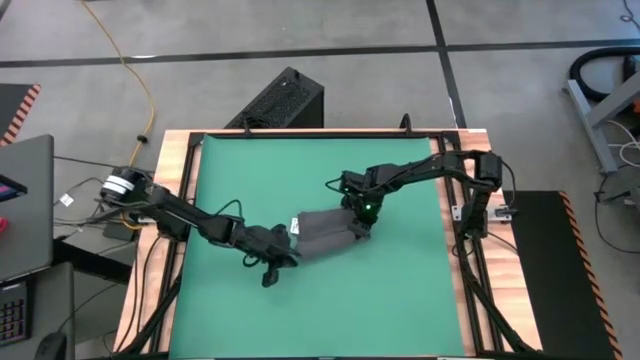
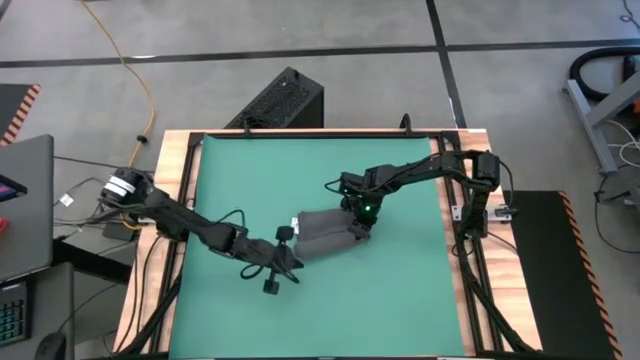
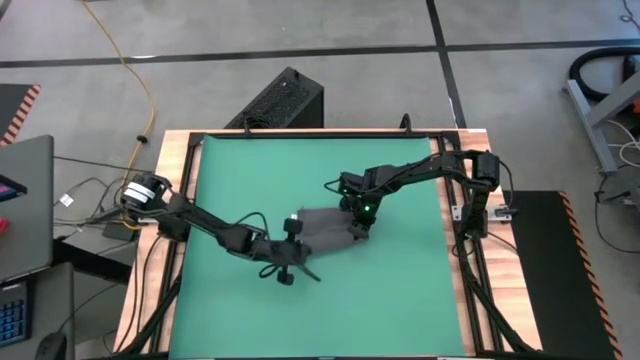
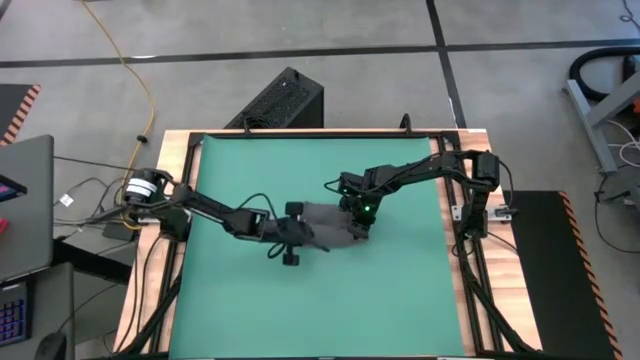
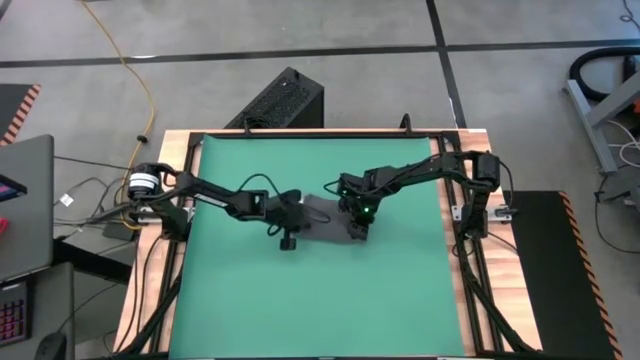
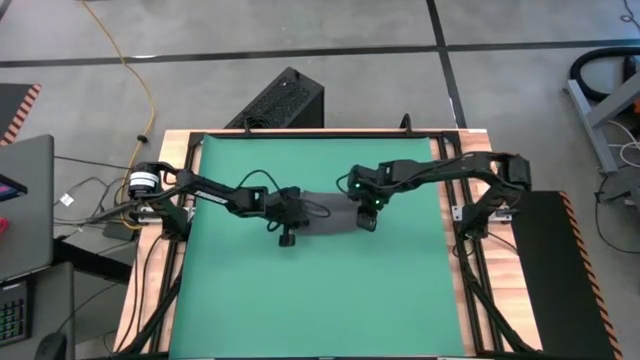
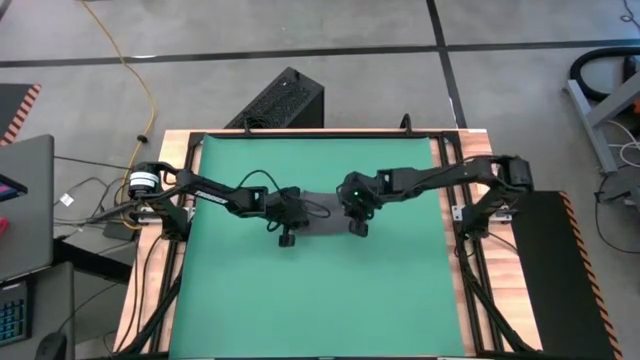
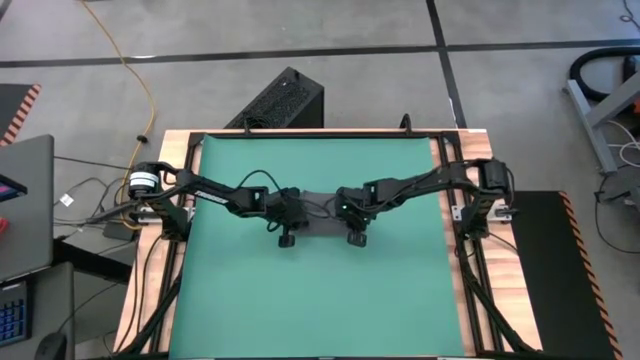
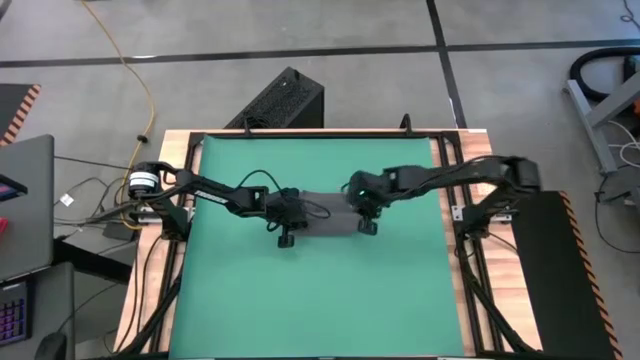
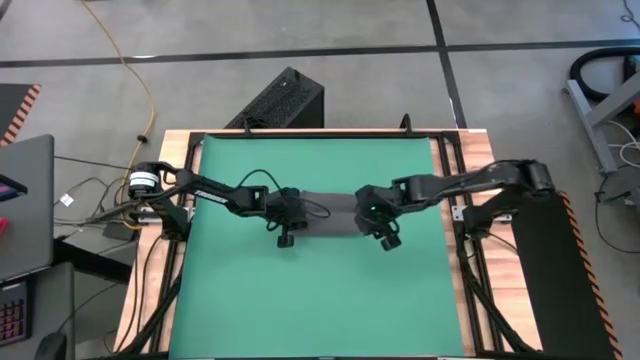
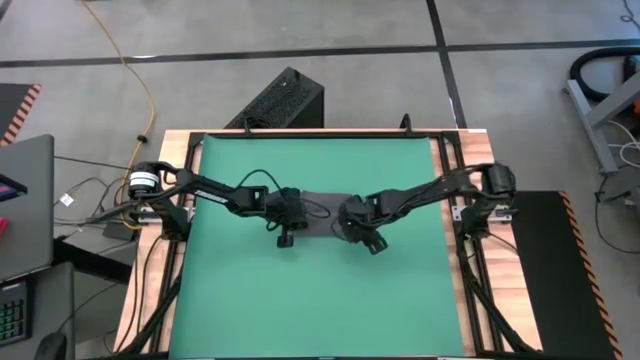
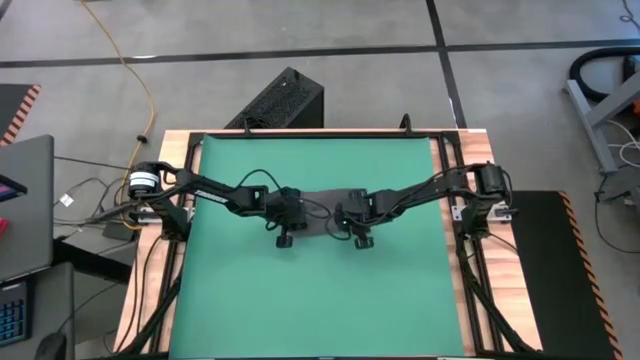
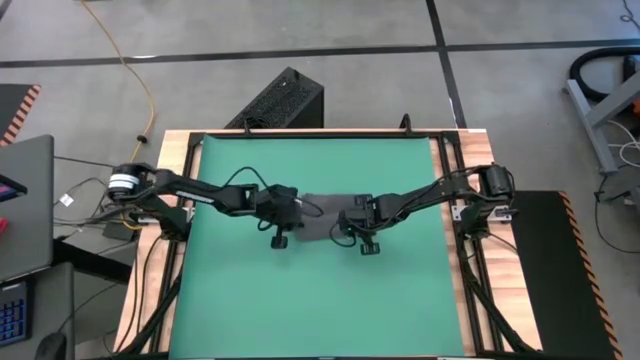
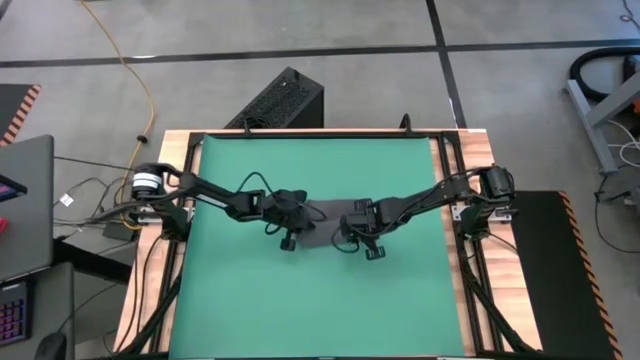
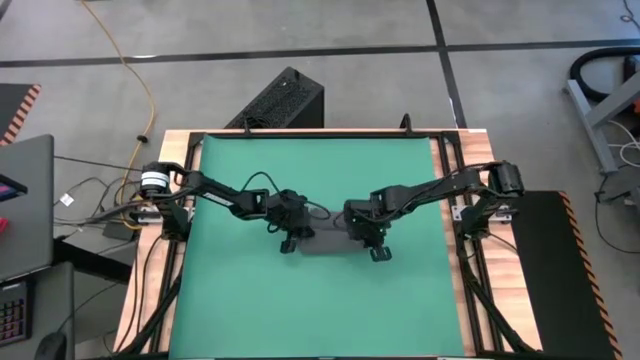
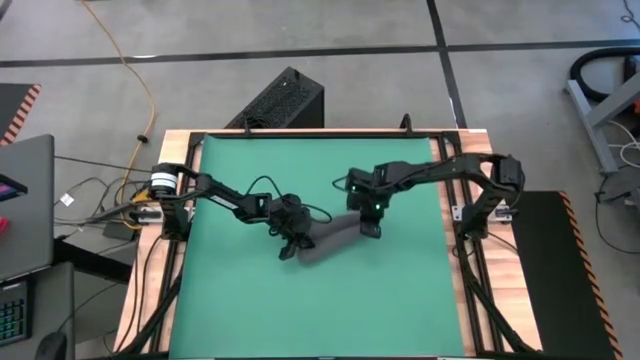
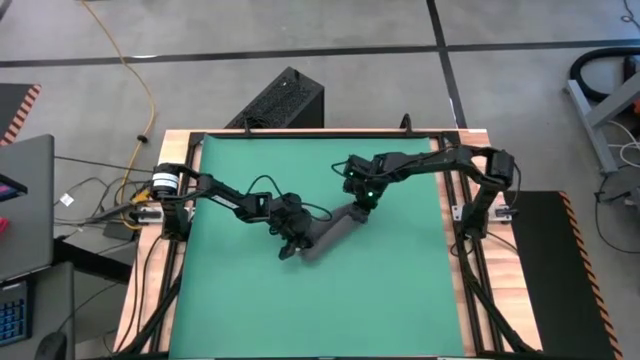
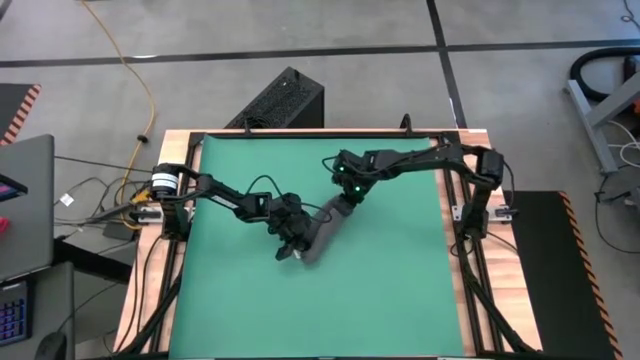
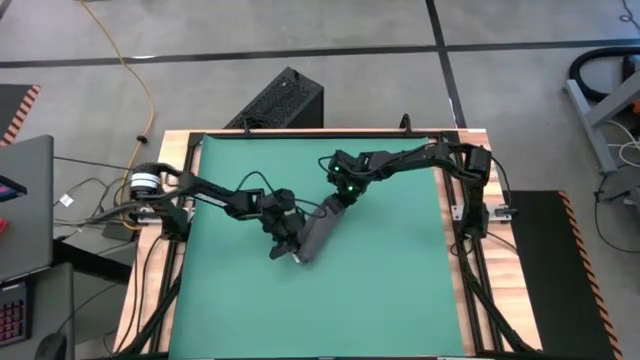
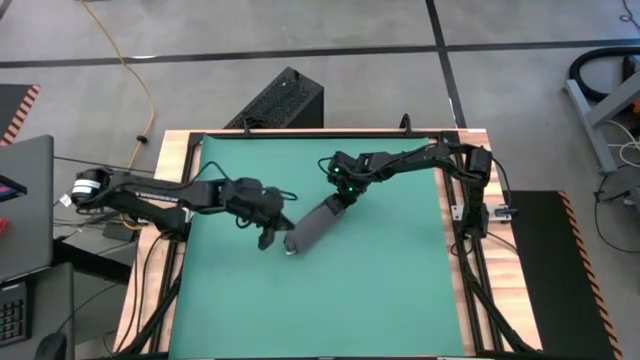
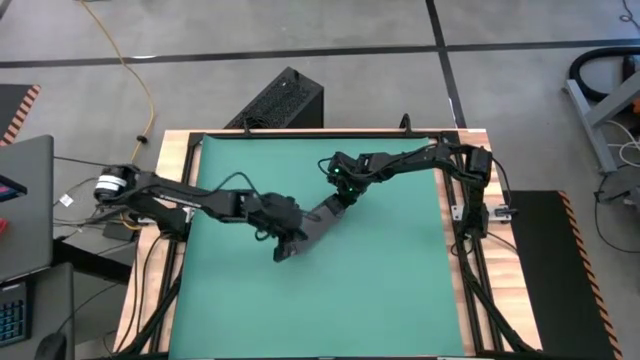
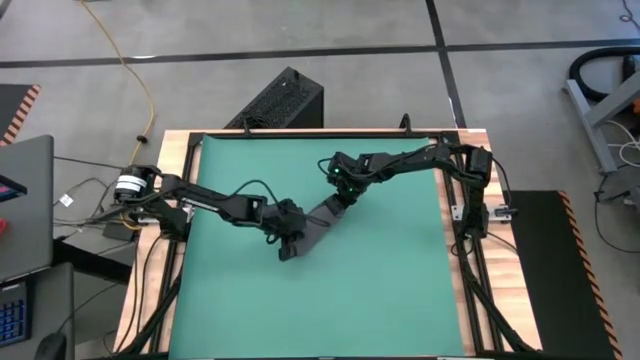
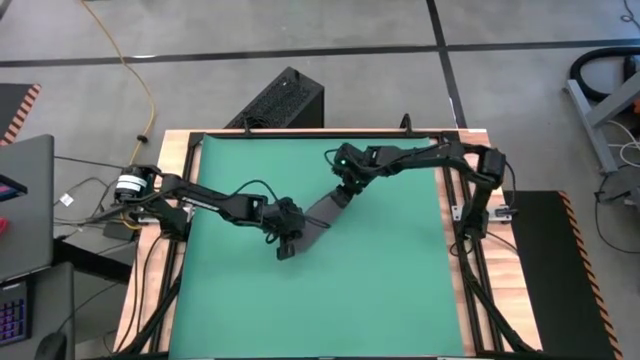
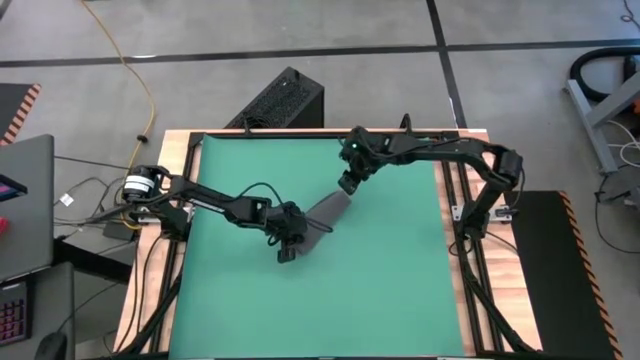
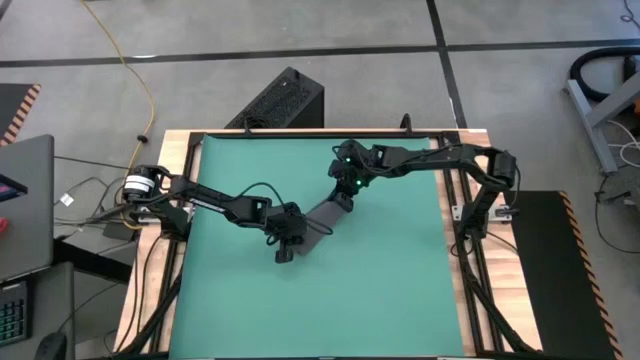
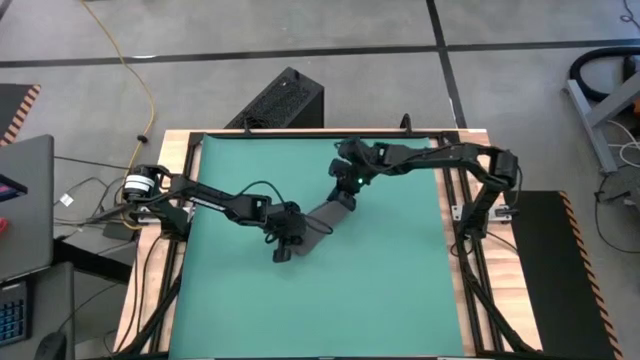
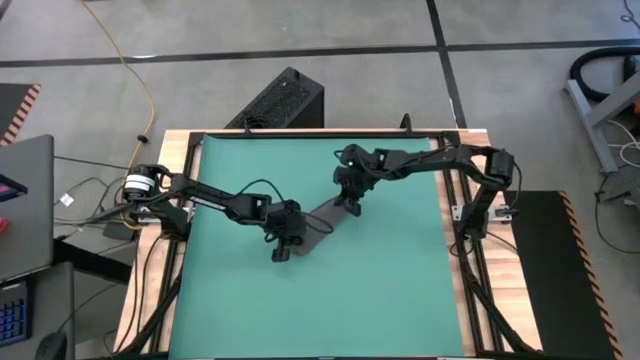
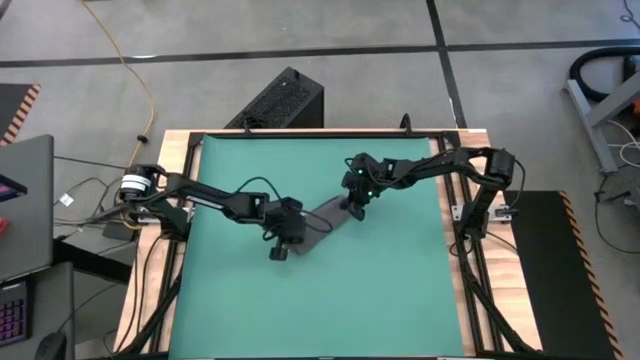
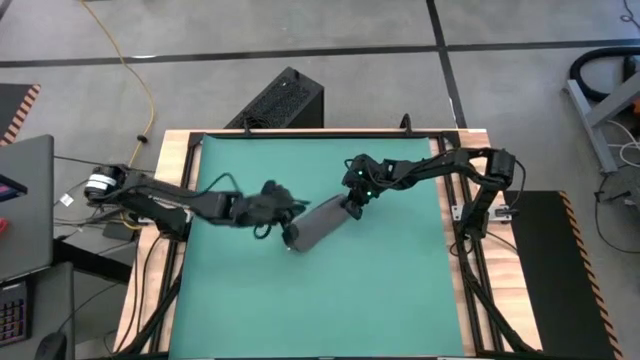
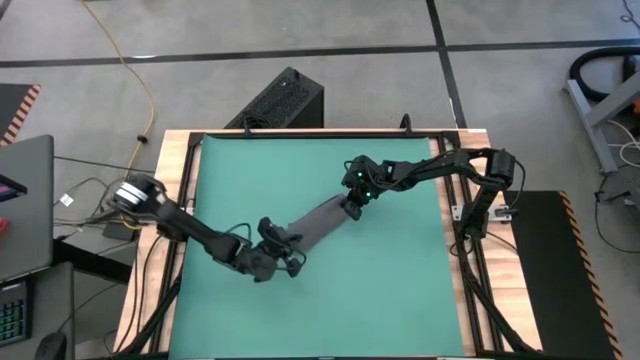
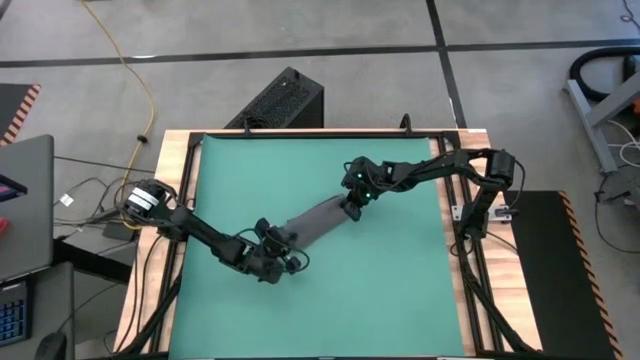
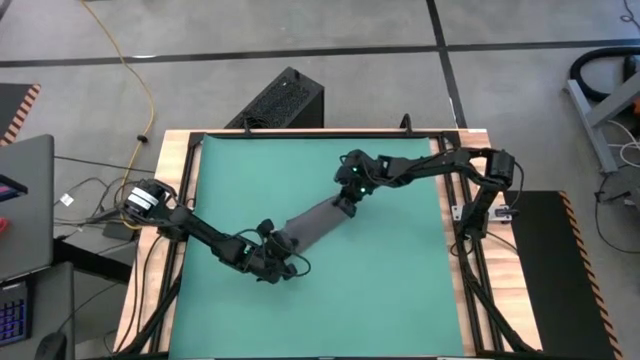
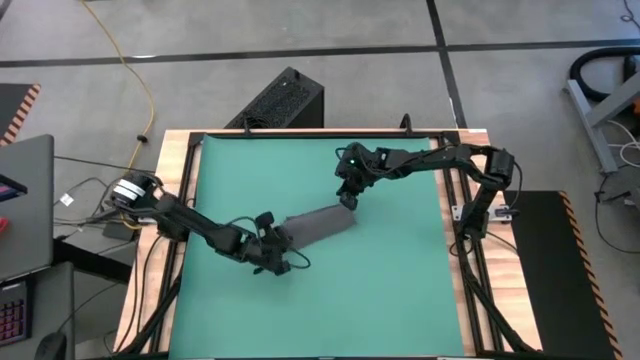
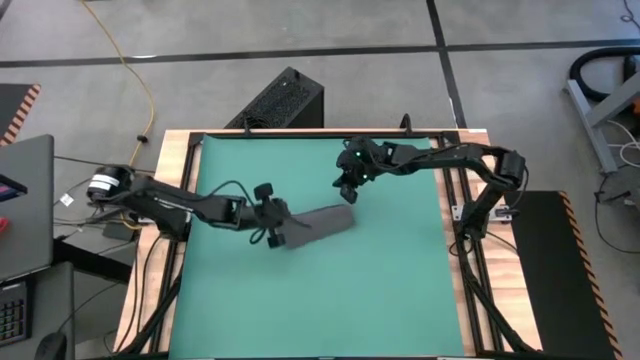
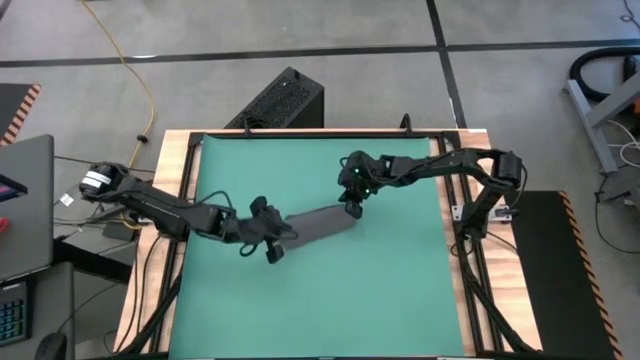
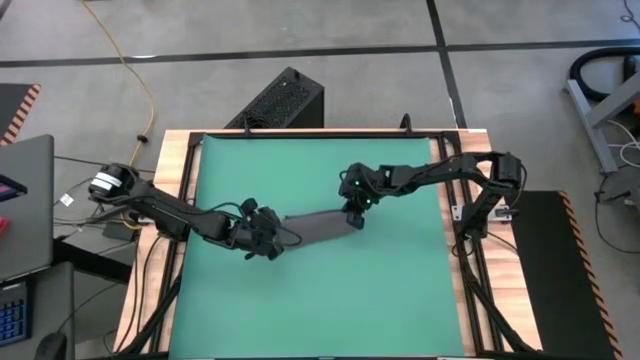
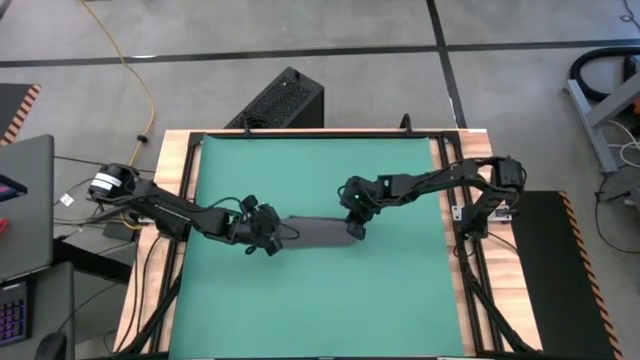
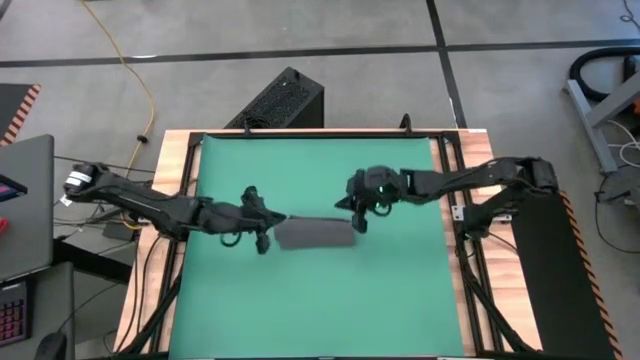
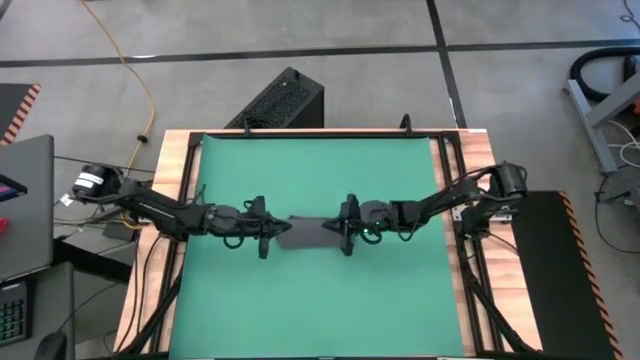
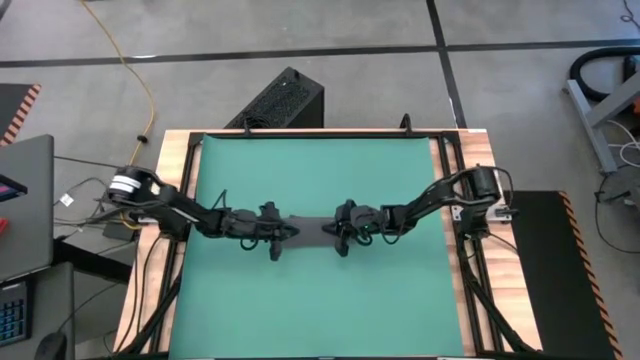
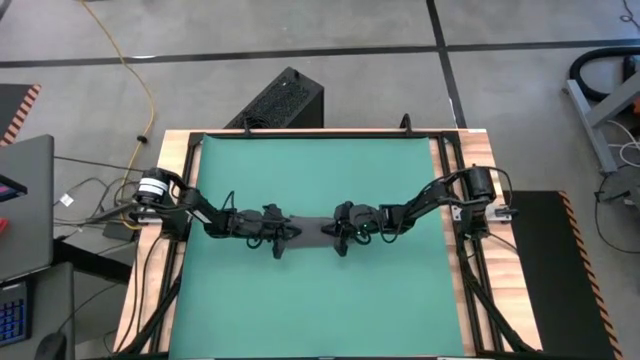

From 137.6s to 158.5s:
Task: Roll towel
Roll the gray towel
